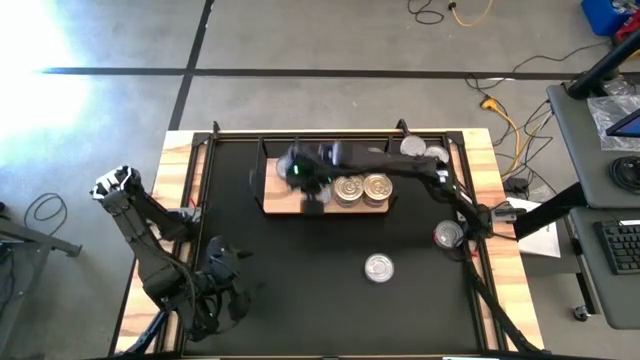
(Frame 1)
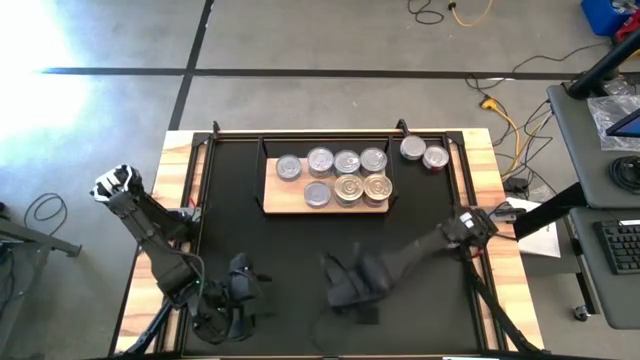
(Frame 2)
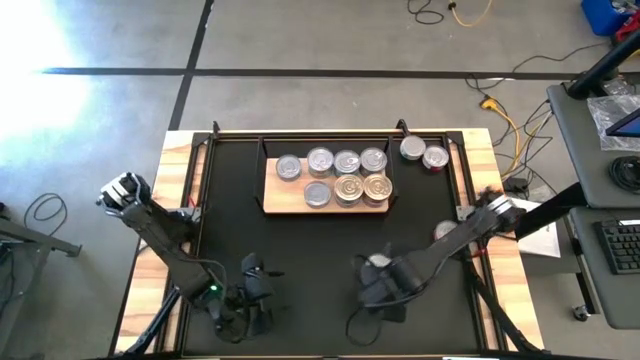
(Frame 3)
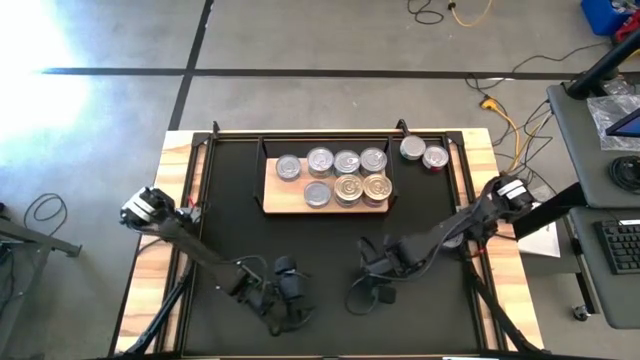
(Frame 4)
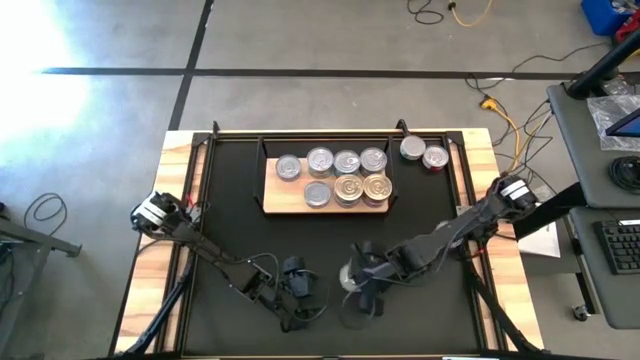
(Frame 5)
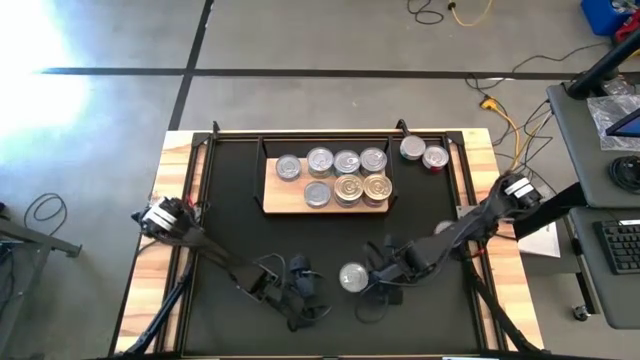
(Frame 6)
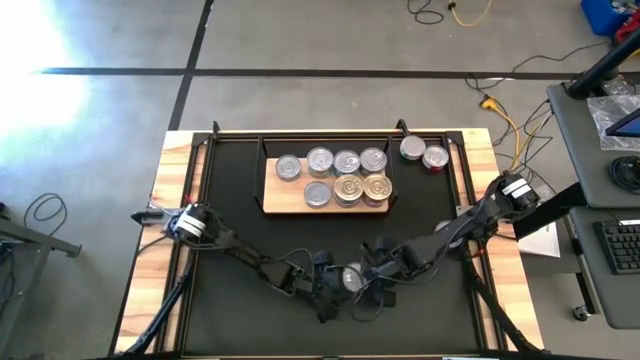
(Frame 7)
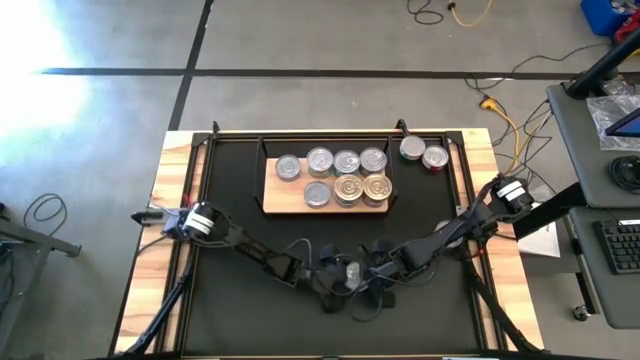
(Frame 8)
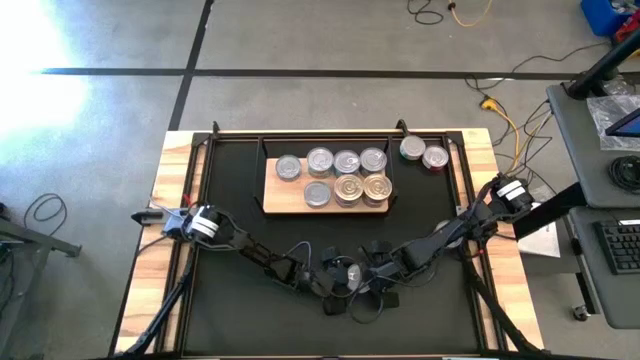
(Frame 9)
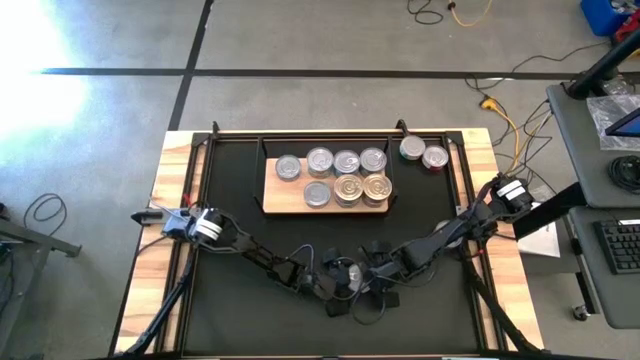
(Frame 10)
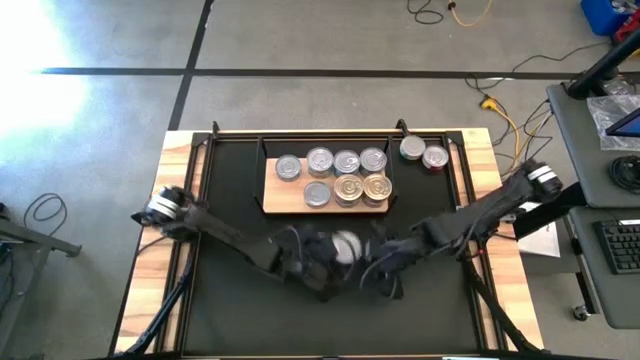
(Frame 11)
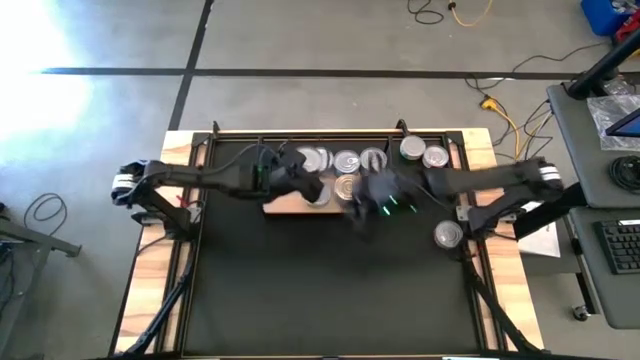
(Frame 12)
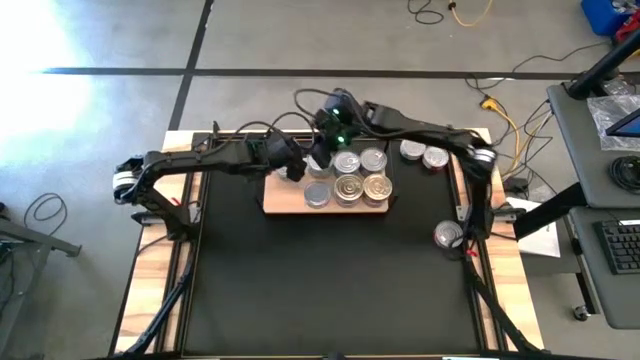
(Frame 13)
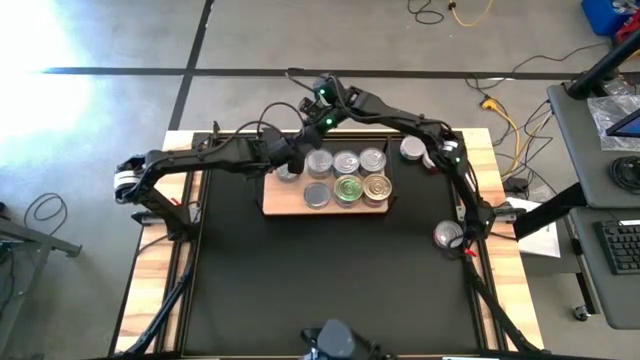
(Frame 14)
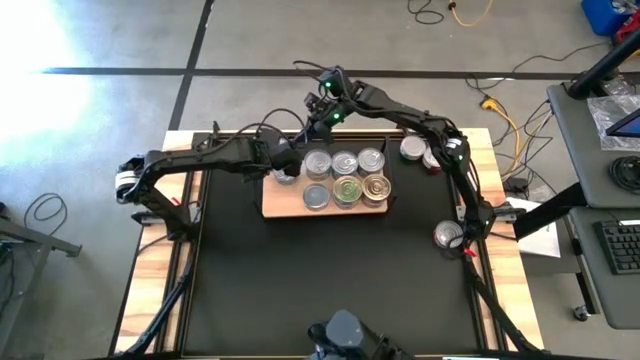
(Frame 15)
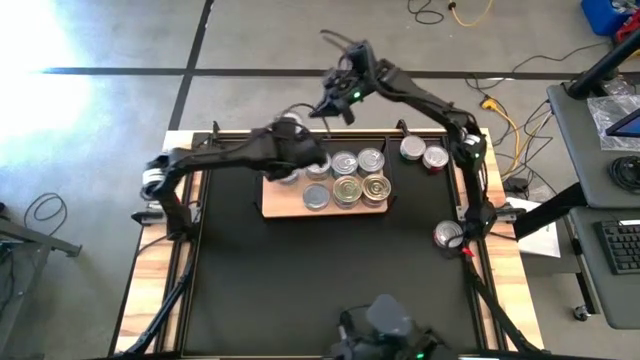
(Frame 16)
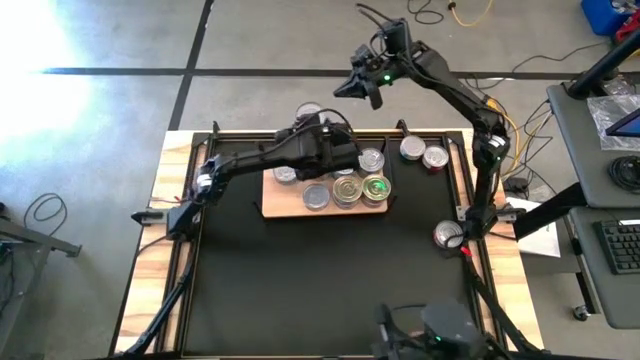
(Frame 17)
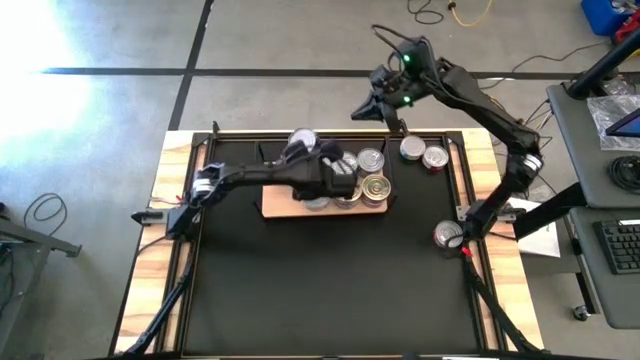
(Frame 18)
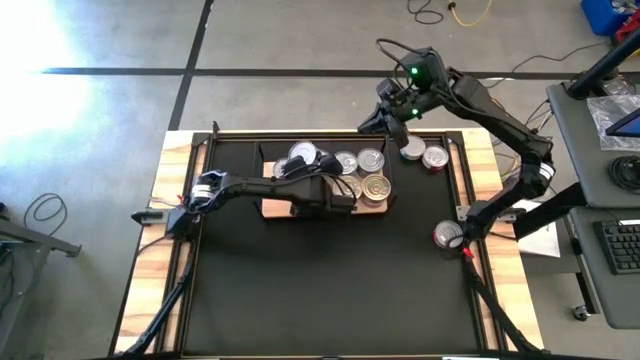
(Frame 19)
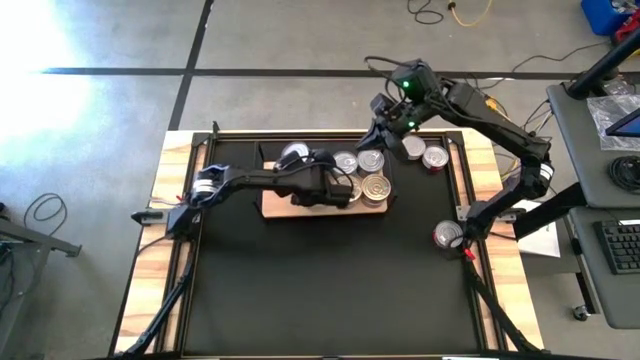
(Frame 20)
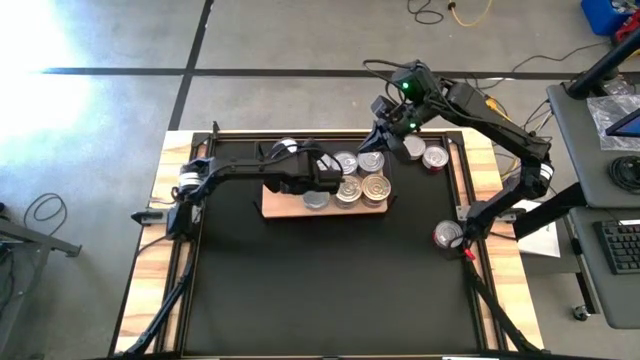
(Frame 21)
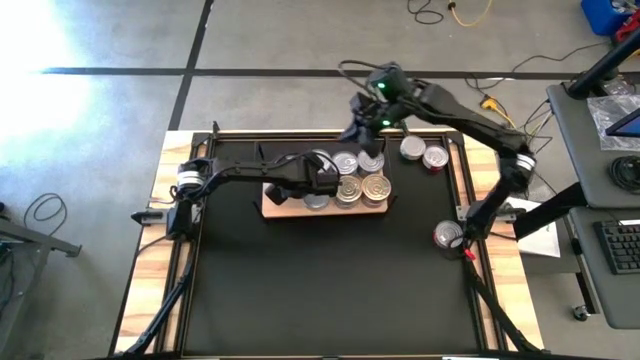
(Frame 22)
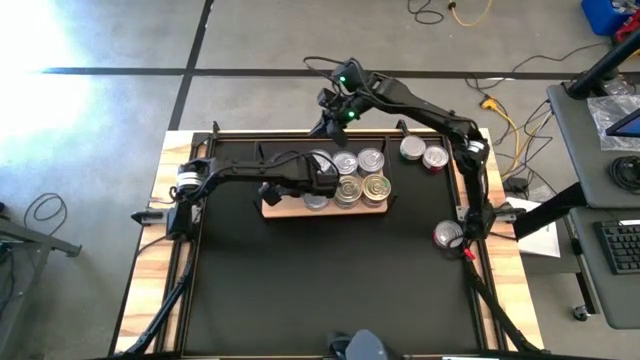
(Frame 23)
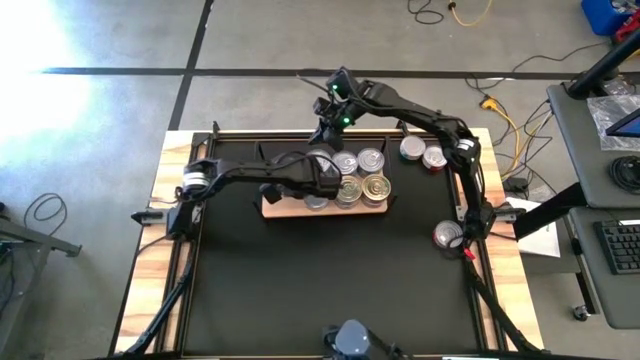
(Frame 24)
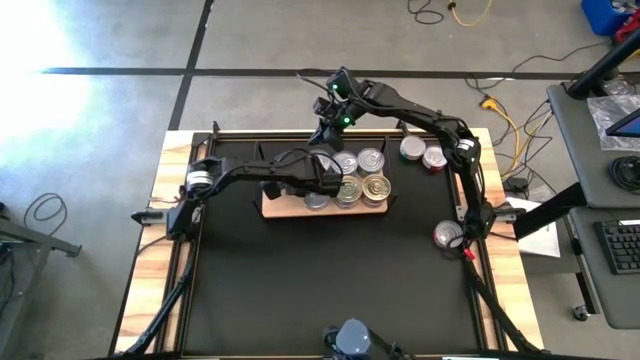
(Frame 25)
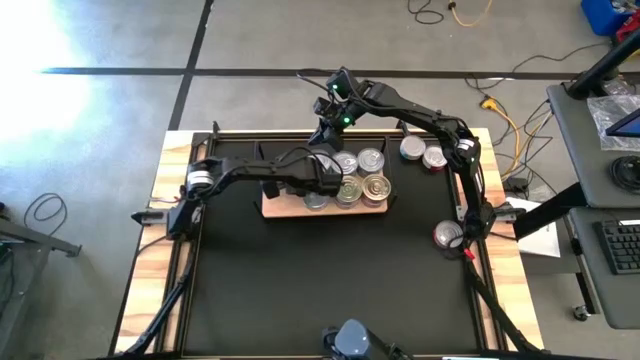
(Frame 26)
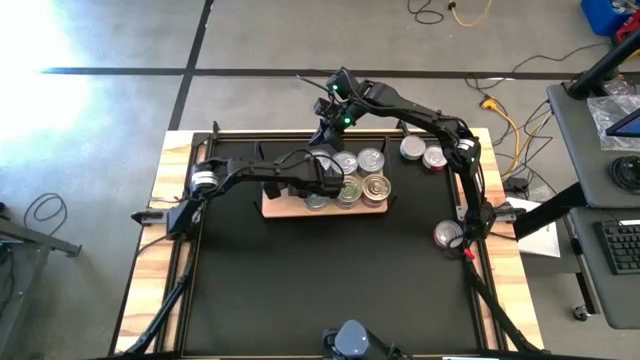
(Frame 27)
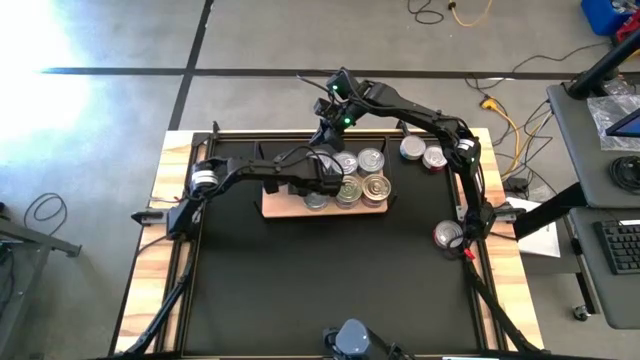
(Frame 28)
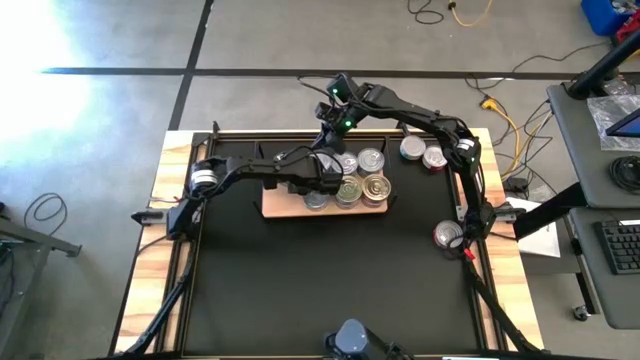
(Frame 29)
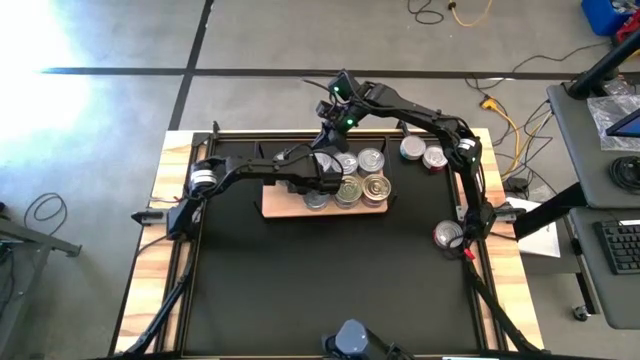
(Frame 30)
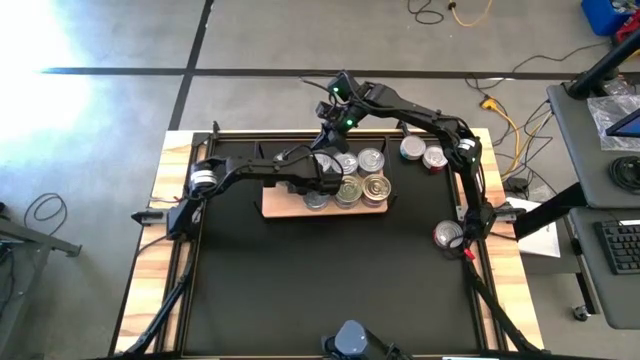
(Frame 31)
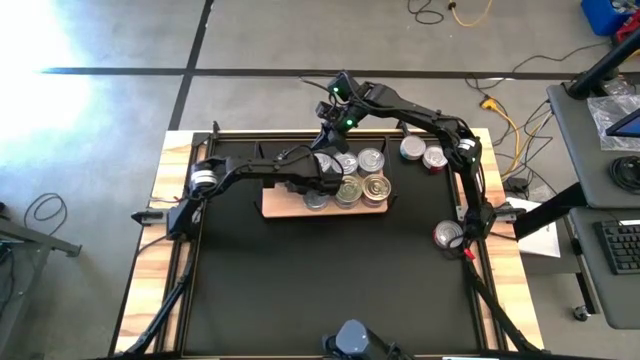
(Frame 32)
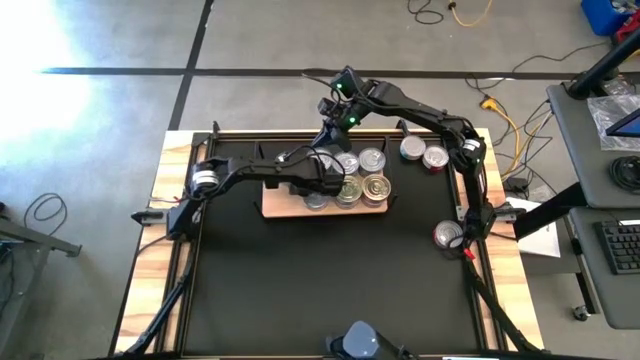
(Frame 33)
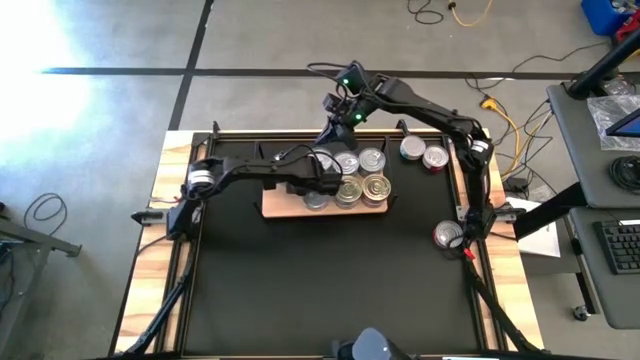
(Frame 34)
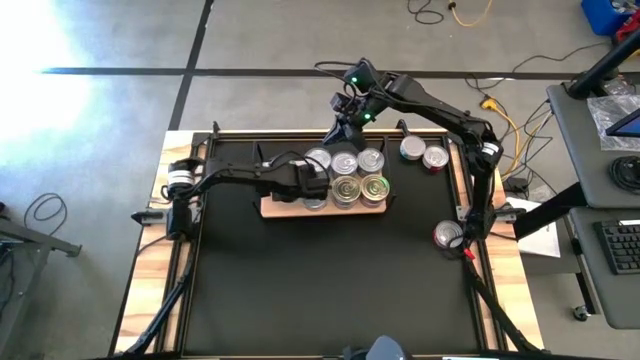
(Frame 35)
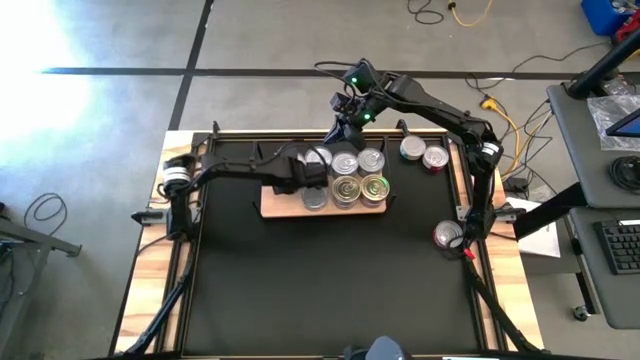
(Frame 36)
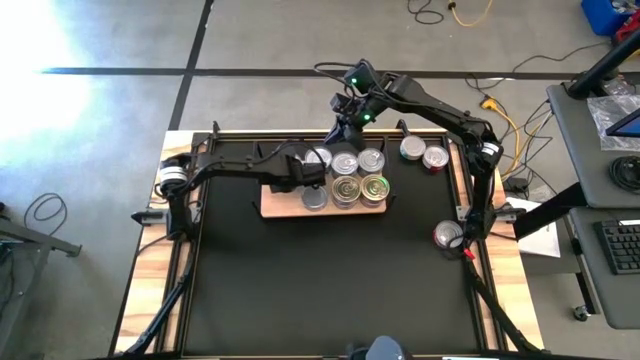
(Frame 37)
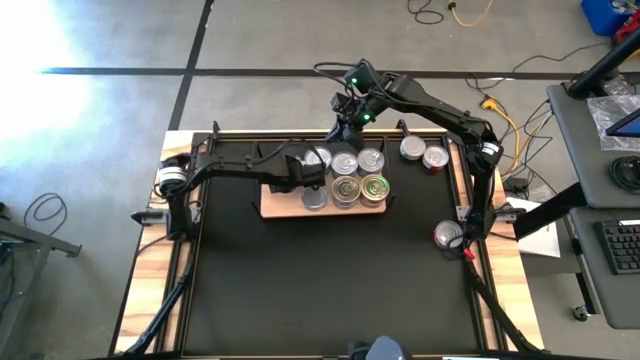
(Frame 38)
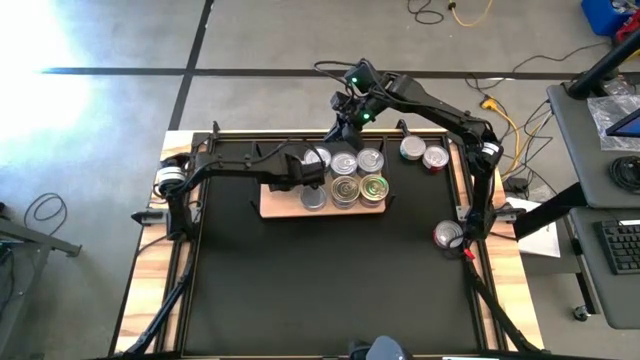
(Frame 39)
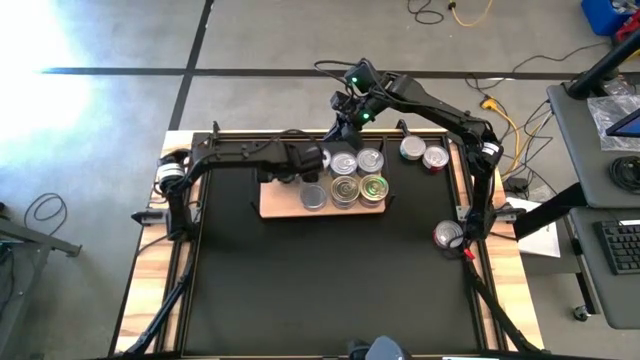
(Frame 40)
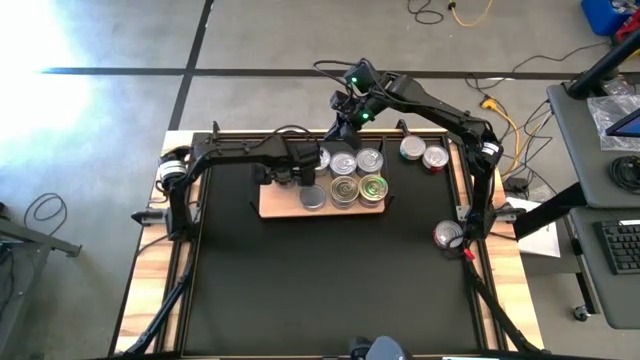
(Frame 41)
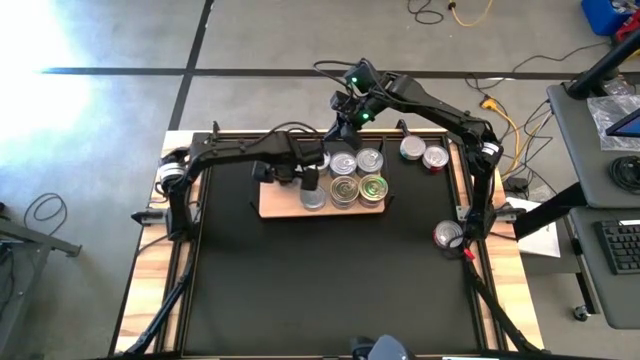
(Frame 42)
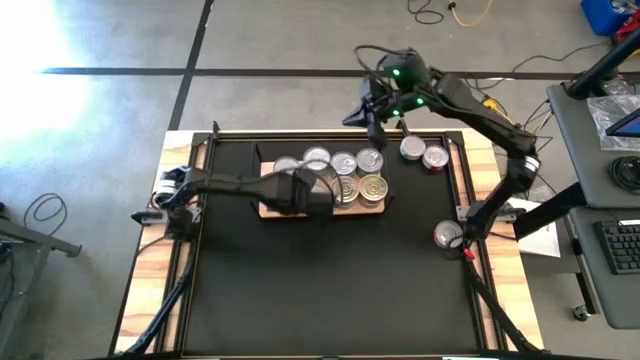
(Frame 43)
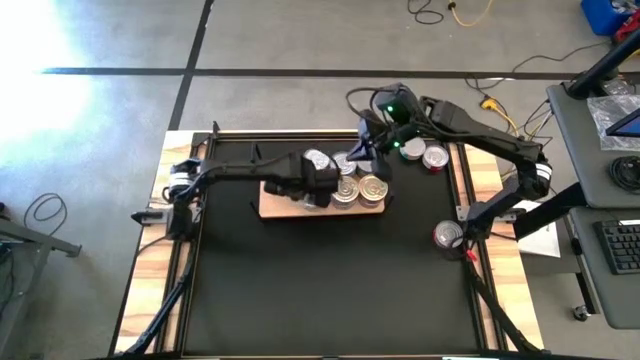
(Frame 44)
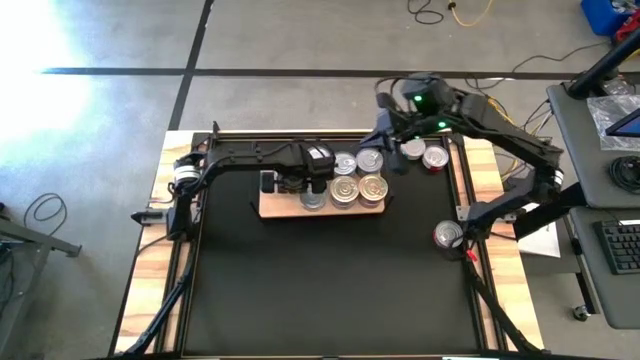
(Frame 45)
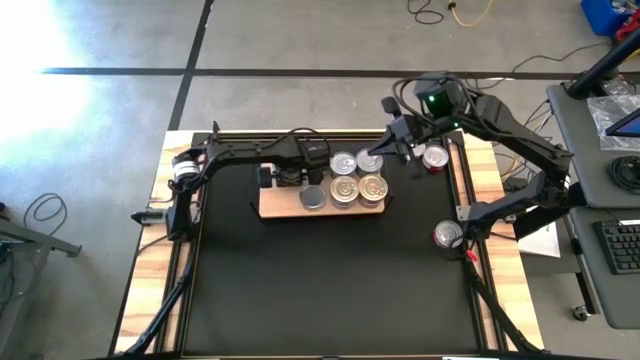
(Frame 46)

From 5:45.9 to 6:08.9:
Task: Stack canned seafood by type on shelf
Stack the center blue tuna can on the blue tuna can
